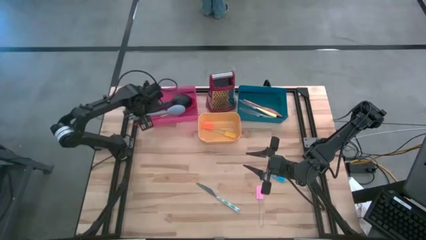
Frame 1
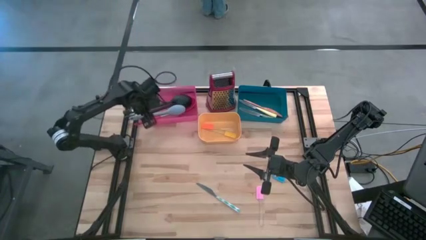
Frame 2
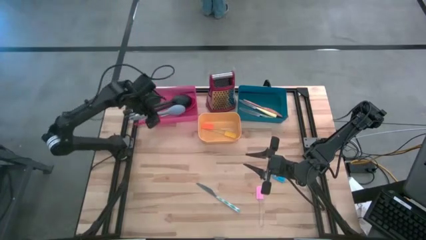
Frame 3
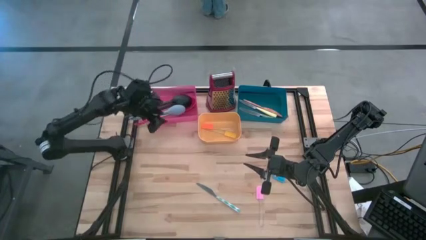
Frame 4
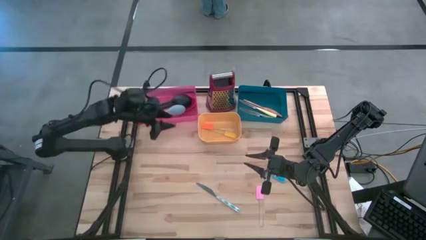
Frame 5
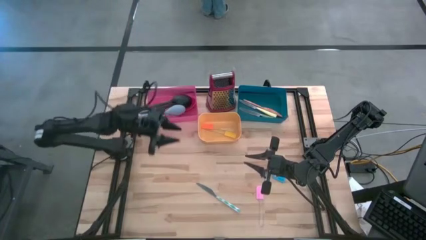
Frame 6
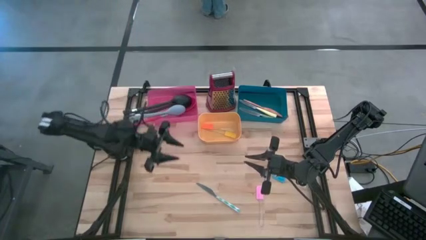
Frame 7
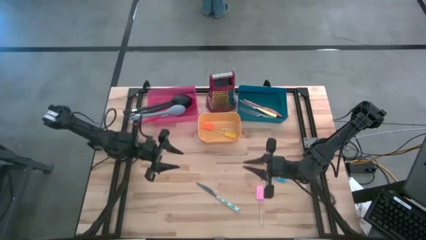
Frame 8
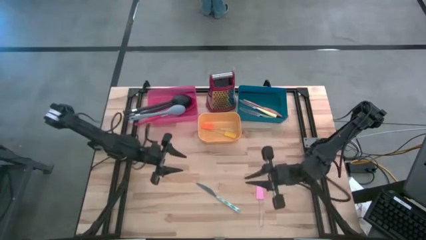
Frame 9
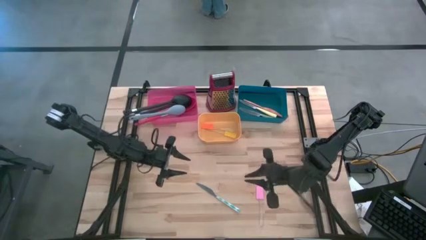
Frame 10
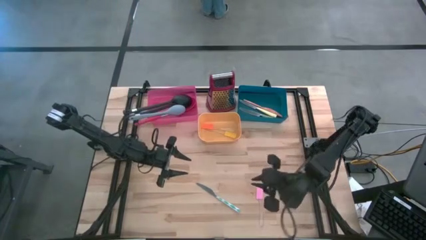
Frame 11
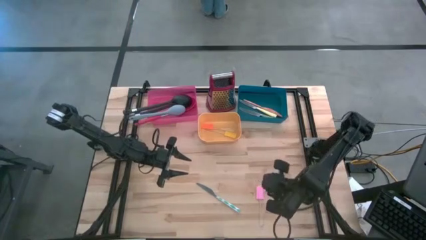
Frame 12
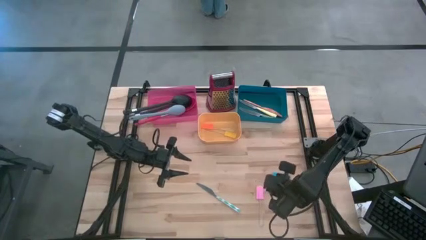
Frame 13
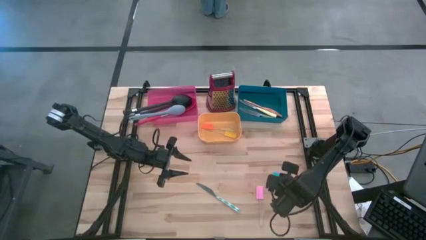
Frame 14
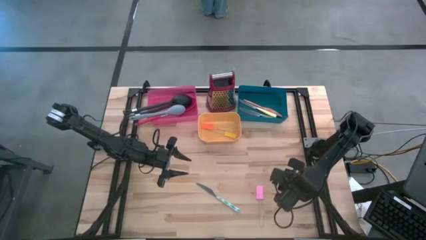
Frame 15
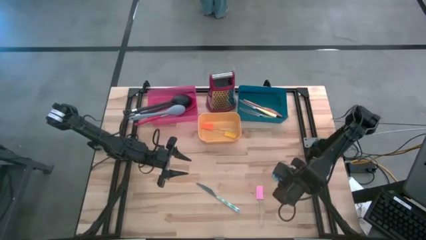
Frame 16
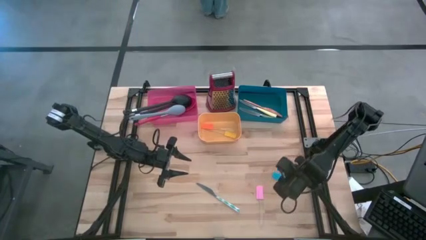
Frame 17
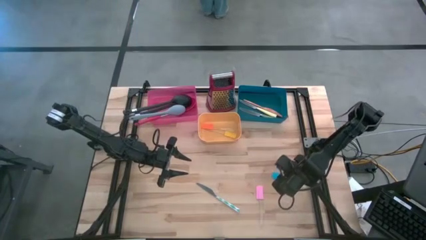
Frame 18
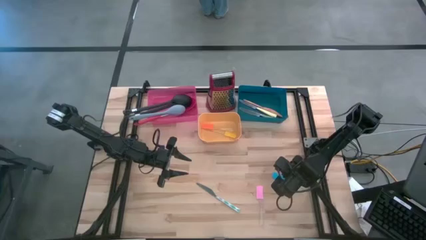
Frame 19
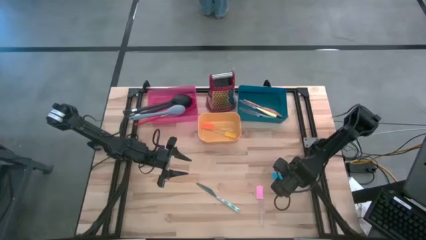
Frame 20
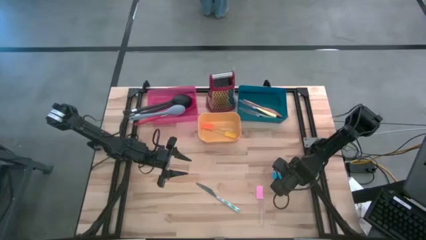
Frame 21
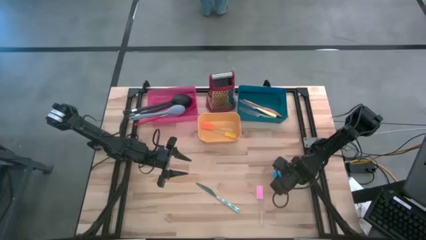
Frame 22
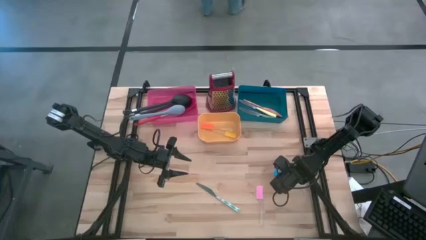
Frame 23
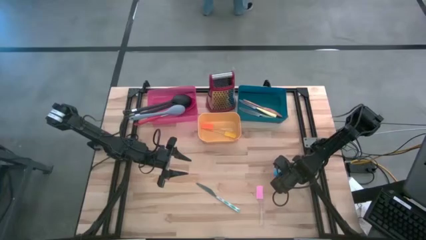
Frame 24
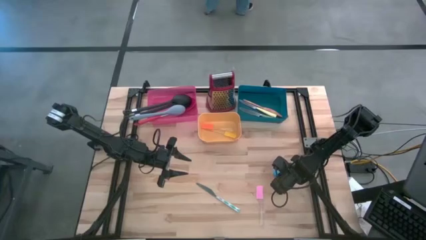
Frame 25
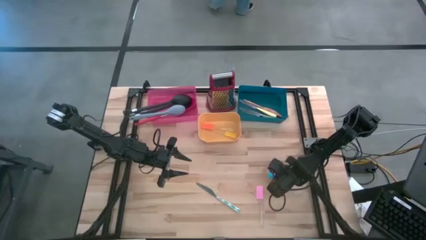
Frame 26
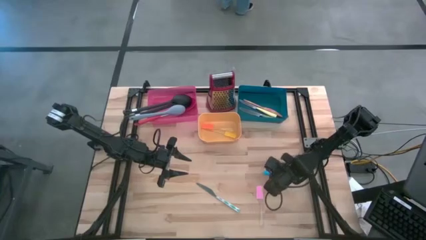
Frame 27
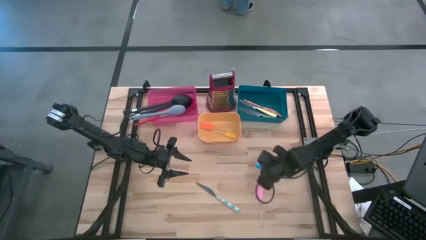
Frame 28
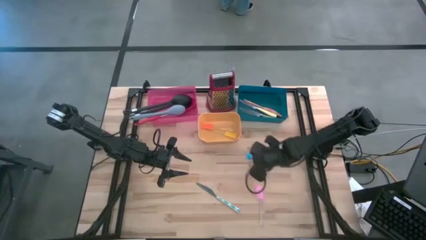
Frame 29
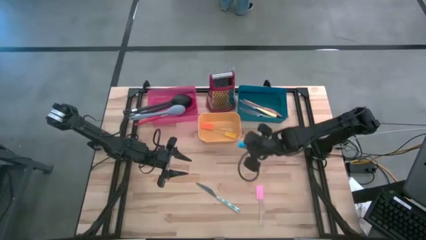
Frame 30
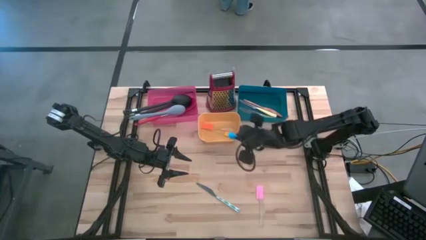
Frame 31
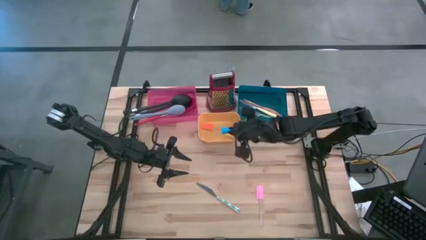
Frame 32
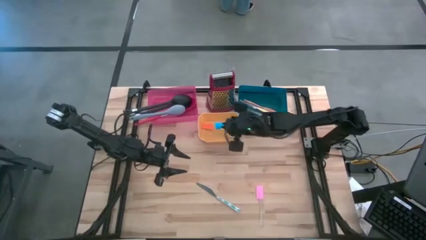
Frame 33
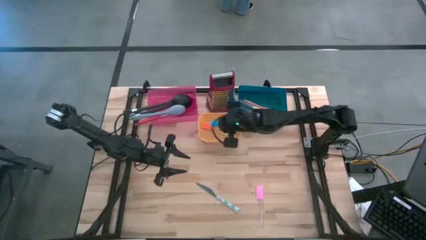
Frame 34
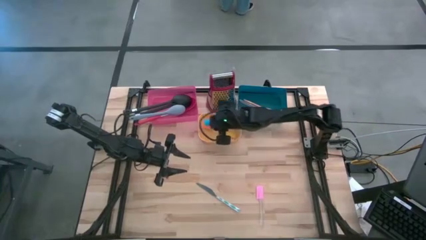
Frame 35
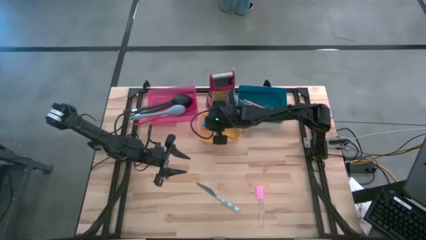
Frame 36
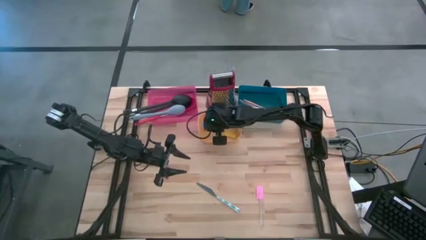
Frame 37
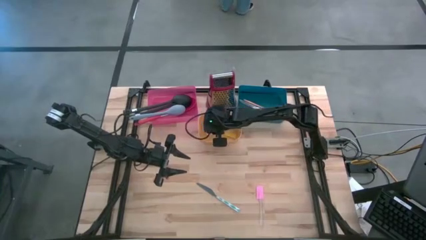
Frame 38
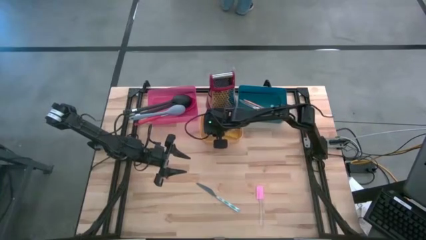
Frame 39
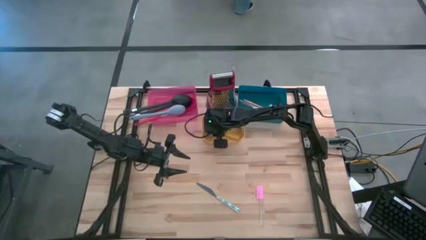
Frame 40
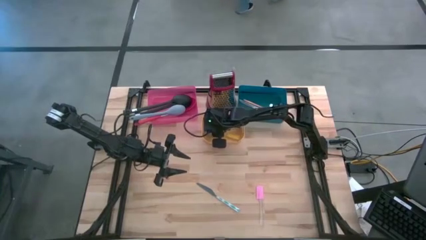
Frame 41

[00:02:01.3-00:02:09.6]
Task: Pick & Place Kitchen Items
Put the blue spatula into the yellow bin

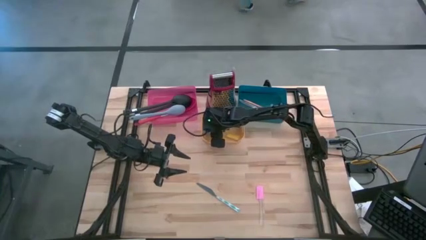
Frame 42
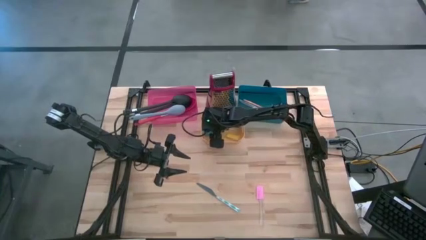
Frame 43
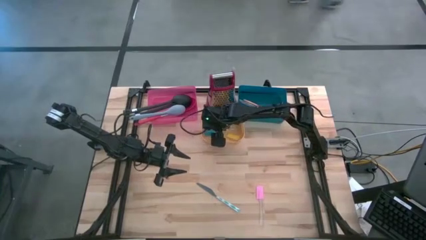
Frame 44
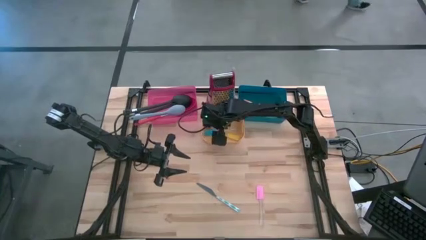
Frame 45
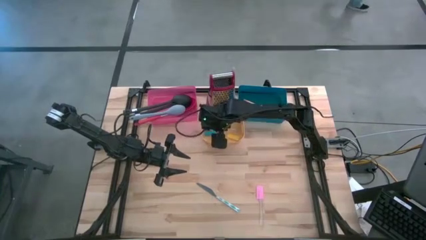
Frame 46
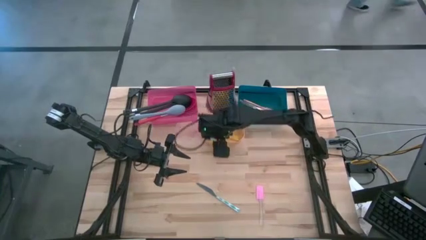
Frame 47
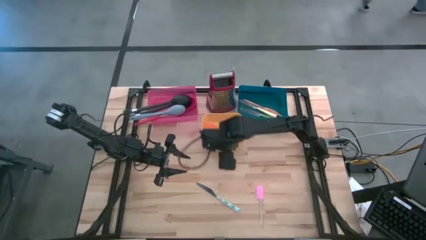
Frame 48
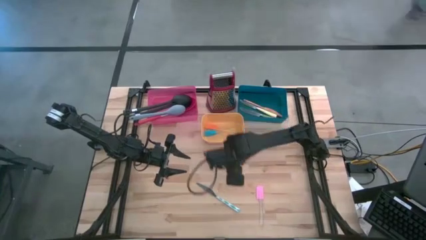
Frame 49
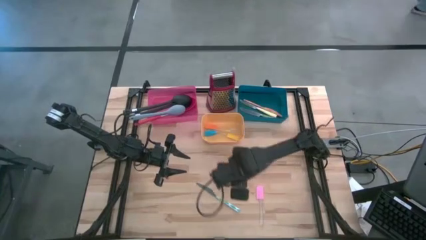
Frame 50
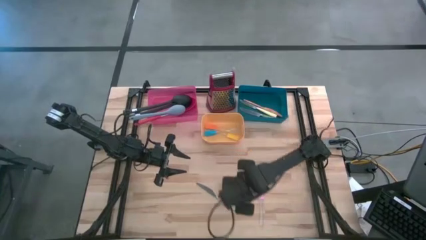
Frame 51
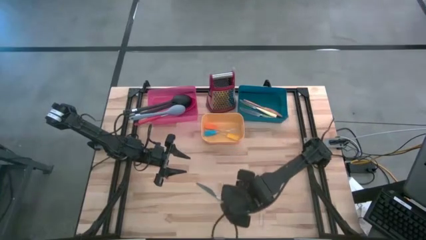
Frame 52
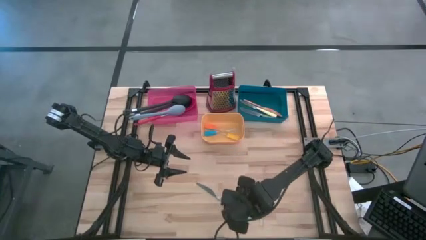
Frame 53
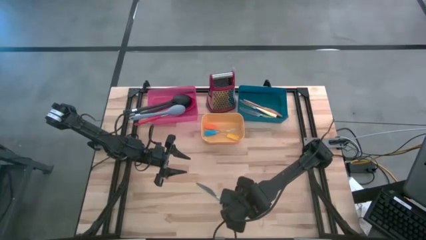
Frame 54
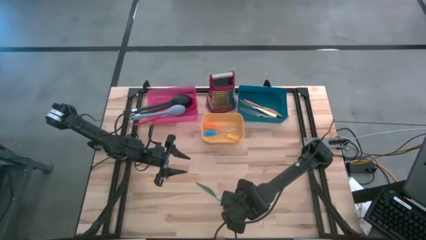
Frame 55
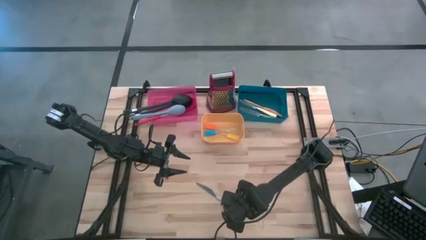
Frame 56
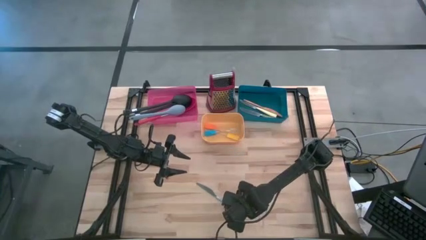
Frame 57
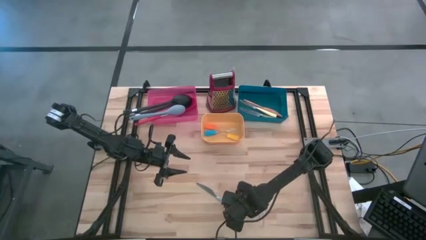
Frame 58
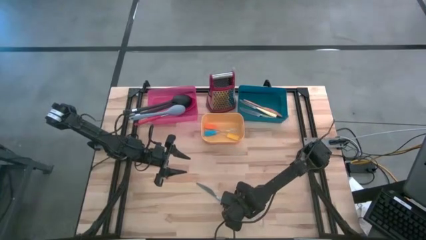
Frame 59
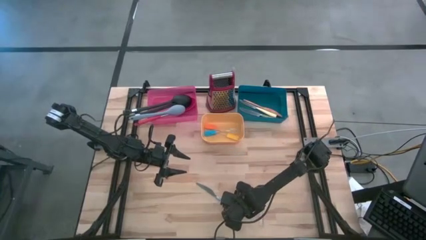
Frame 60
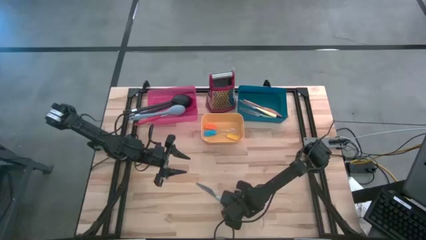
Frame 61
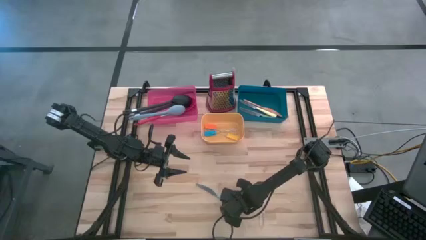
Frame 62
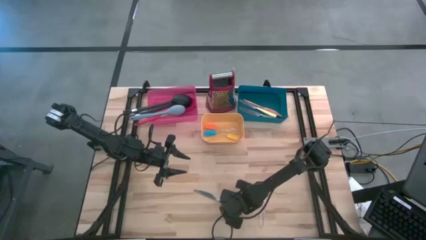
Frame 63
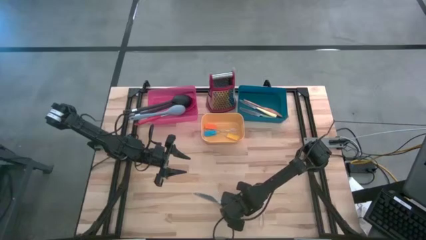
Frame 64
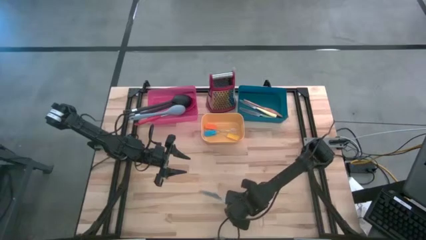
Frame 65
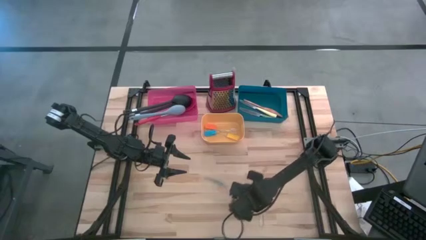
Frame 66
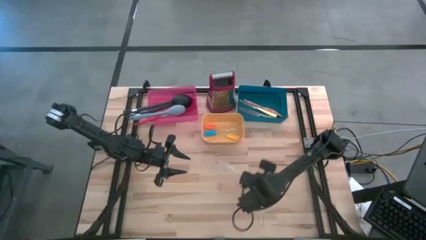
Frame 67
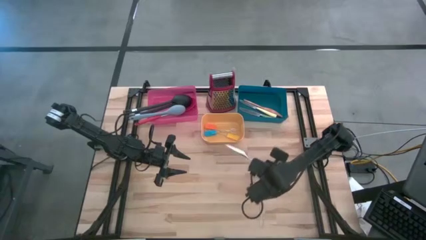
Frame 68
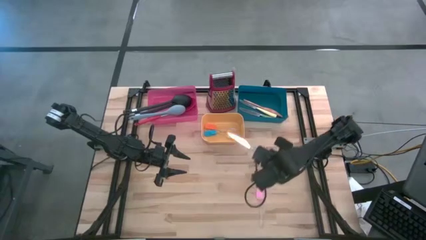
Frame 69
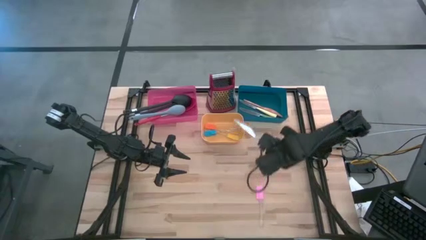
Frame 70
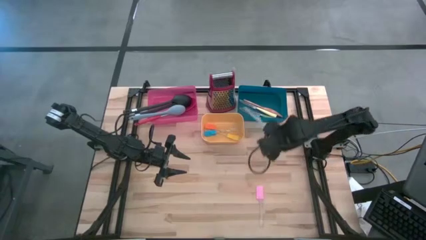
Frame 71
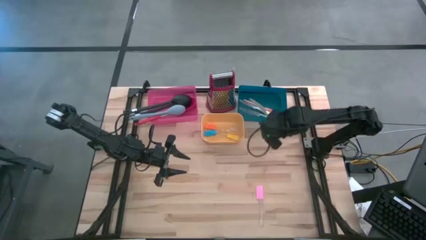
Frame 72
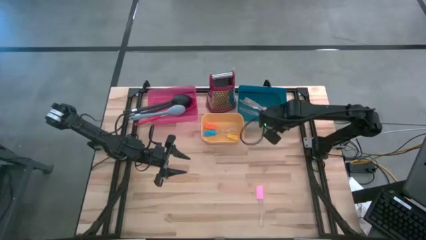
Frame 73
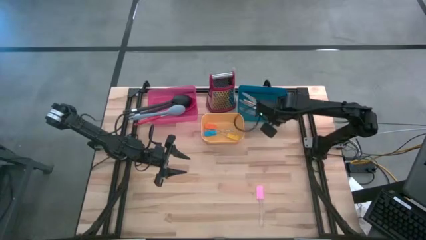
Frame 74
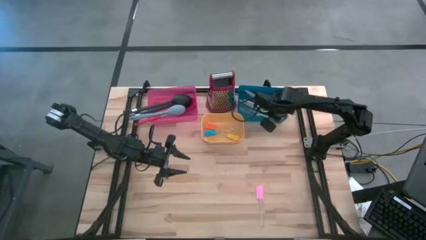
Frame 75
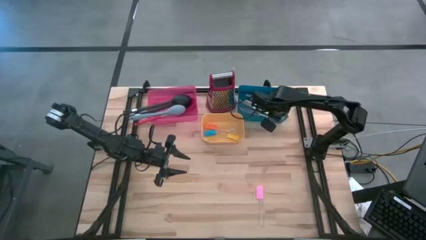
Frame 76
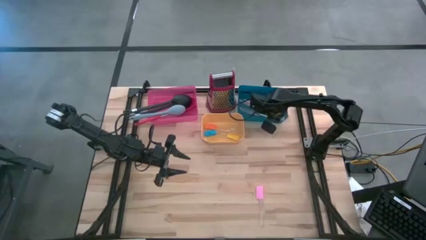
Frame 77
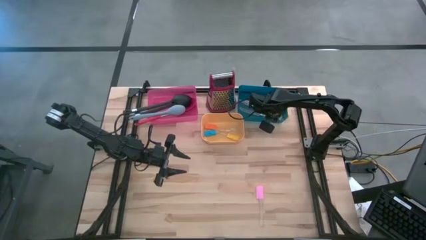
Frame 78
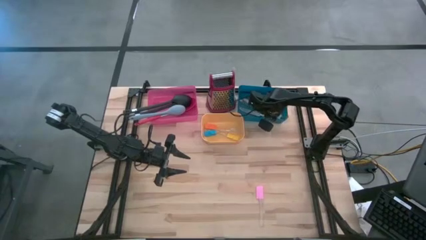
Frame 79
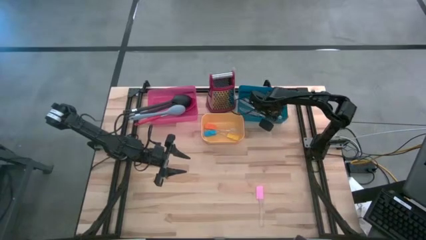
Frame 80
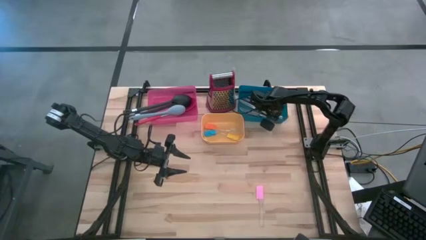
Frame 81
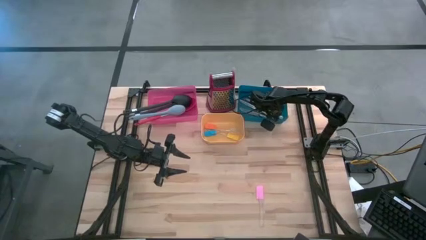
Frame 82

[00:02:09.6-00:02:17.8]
Put the white table knife into the blue bin
